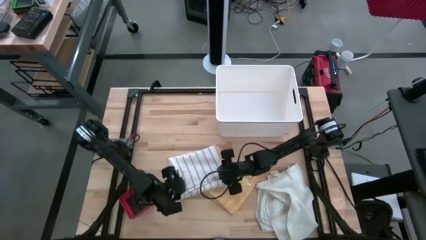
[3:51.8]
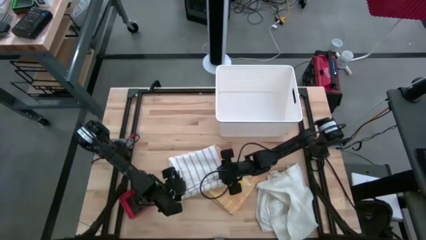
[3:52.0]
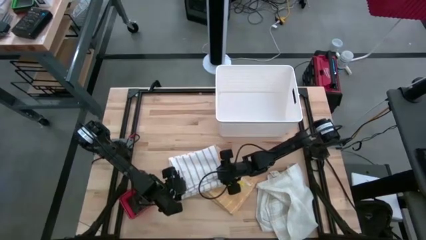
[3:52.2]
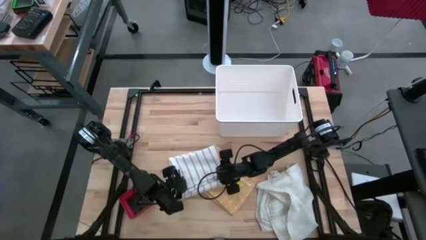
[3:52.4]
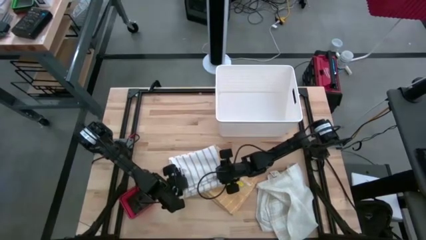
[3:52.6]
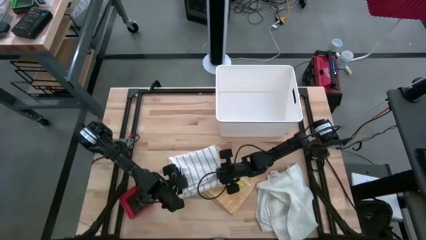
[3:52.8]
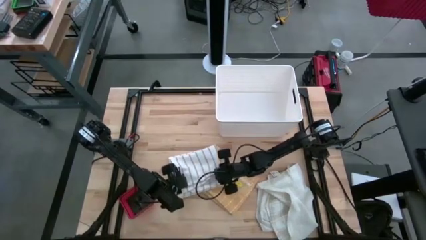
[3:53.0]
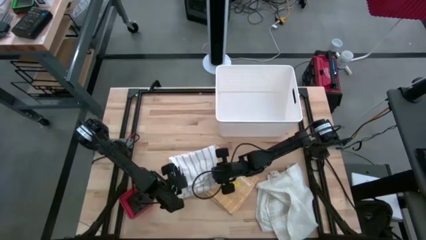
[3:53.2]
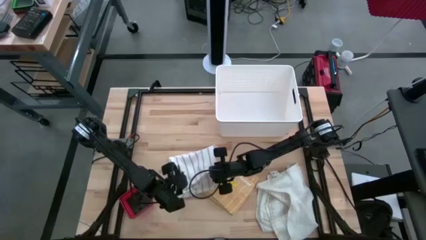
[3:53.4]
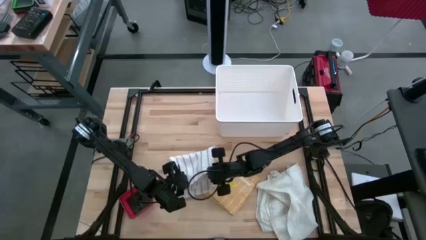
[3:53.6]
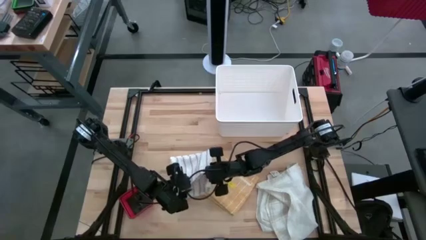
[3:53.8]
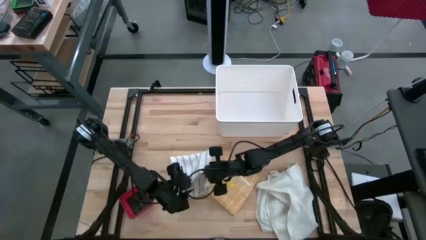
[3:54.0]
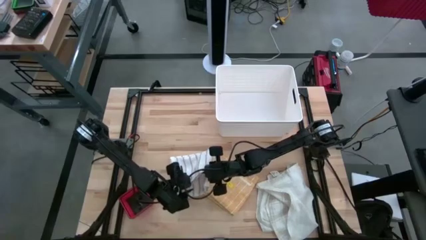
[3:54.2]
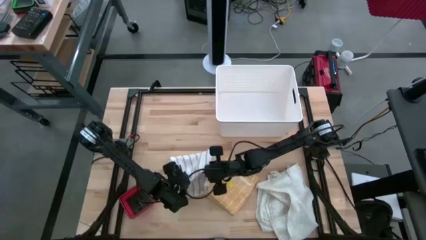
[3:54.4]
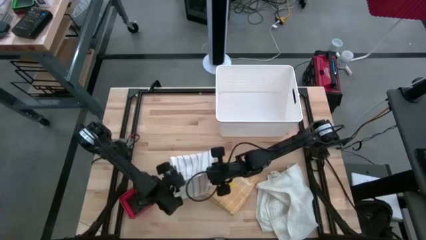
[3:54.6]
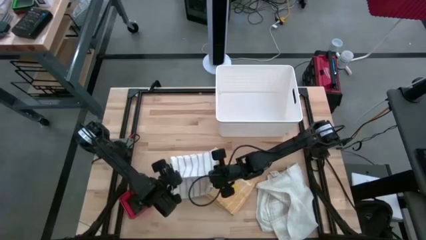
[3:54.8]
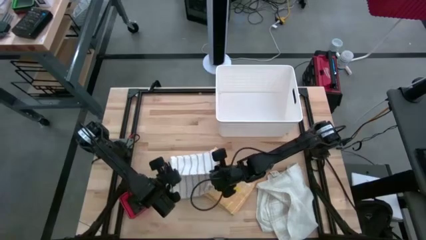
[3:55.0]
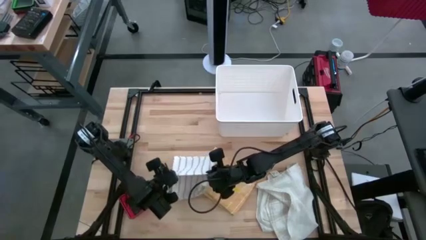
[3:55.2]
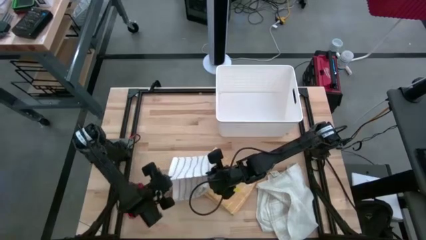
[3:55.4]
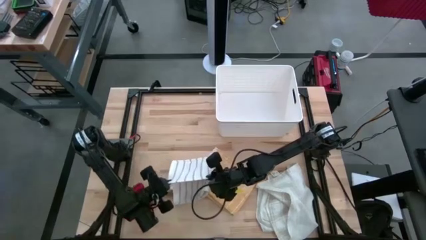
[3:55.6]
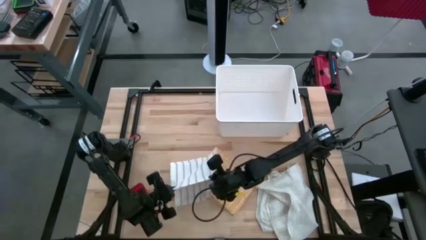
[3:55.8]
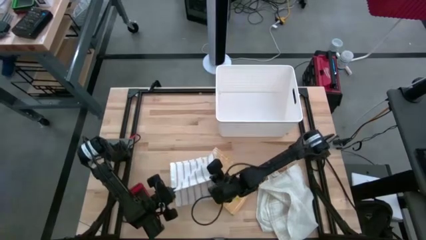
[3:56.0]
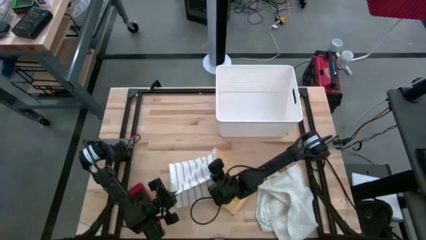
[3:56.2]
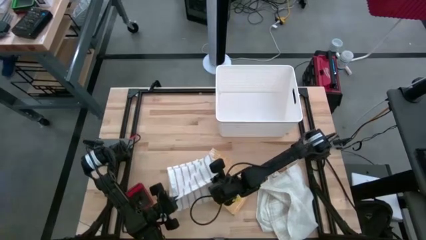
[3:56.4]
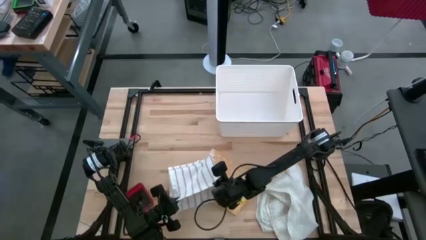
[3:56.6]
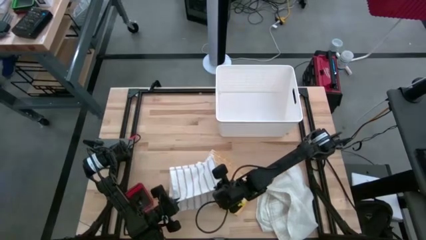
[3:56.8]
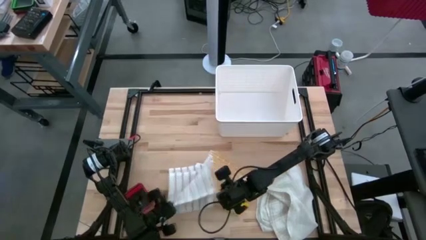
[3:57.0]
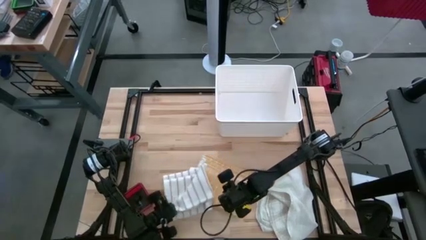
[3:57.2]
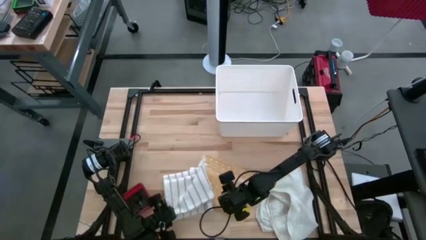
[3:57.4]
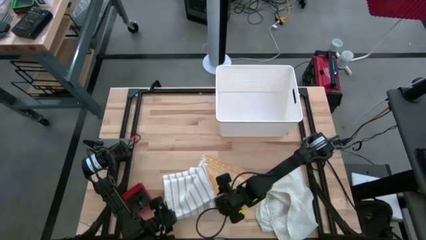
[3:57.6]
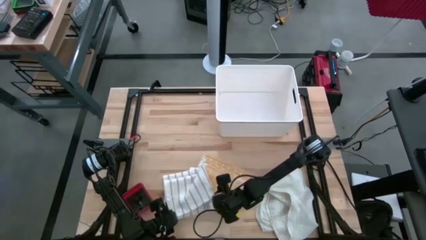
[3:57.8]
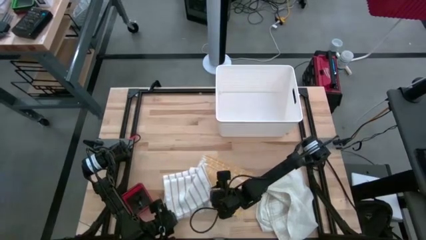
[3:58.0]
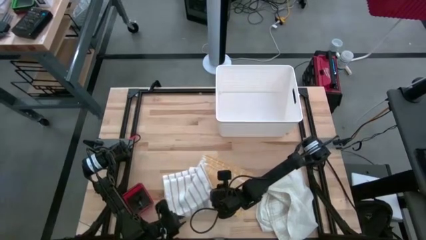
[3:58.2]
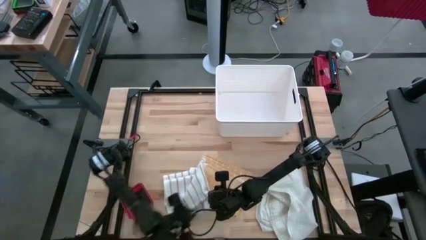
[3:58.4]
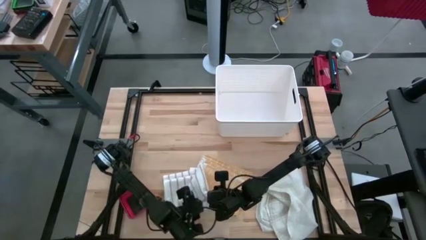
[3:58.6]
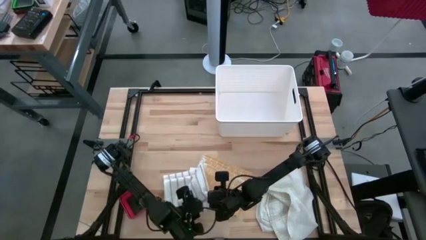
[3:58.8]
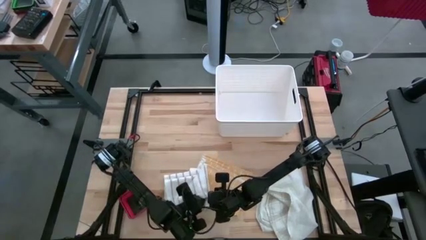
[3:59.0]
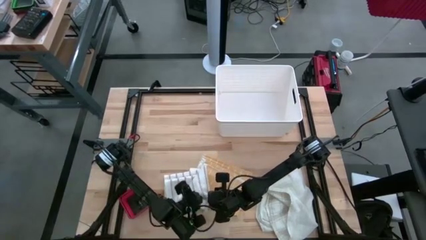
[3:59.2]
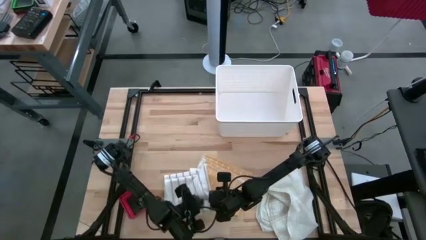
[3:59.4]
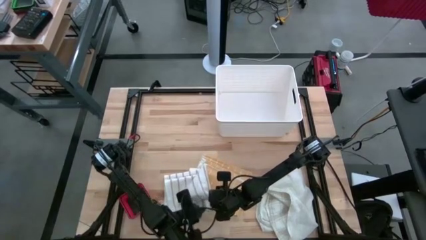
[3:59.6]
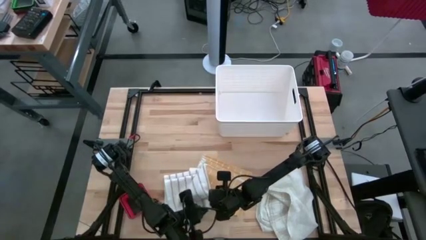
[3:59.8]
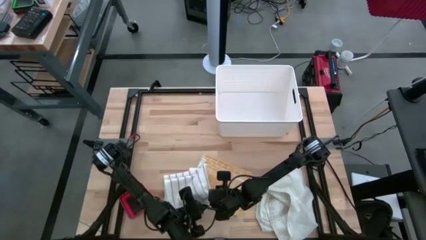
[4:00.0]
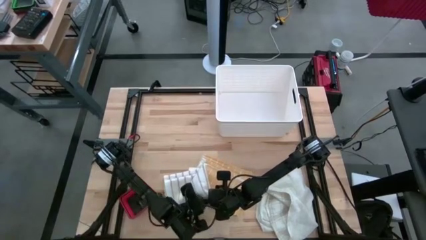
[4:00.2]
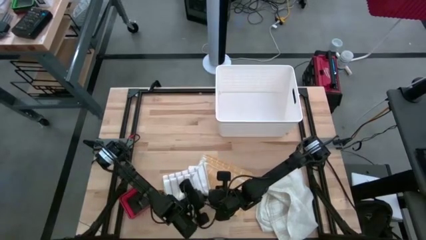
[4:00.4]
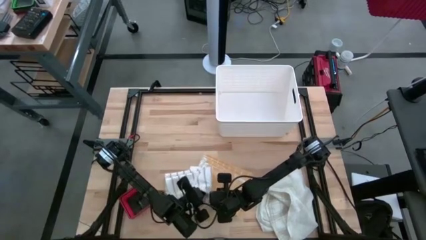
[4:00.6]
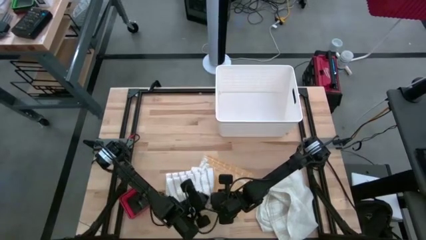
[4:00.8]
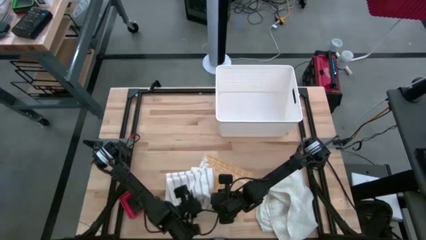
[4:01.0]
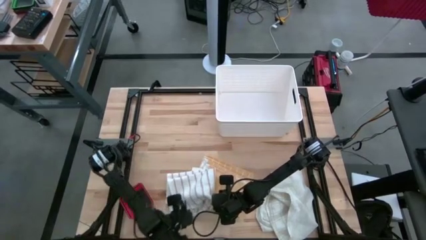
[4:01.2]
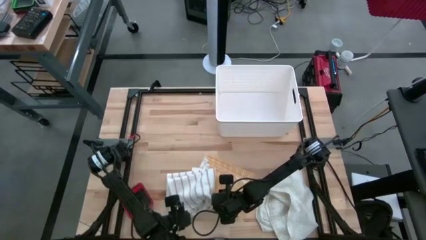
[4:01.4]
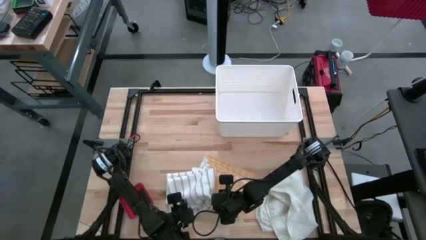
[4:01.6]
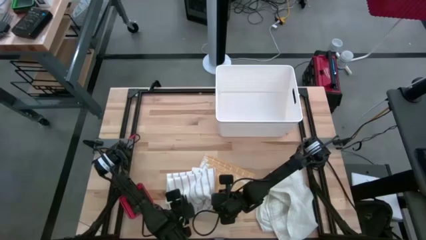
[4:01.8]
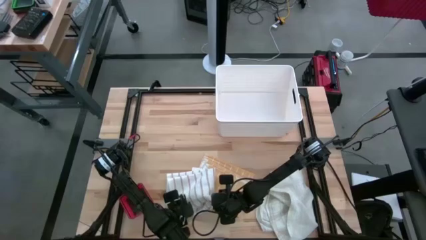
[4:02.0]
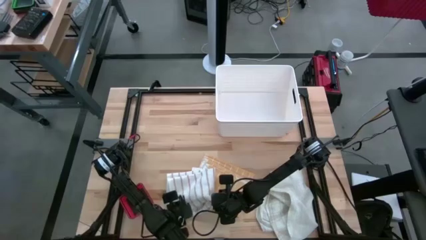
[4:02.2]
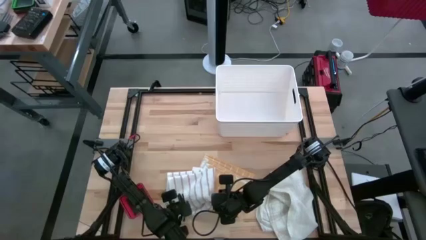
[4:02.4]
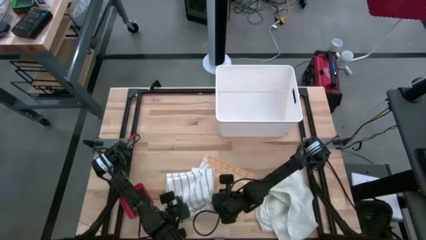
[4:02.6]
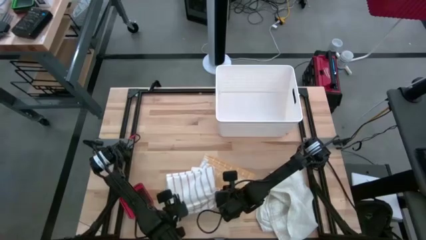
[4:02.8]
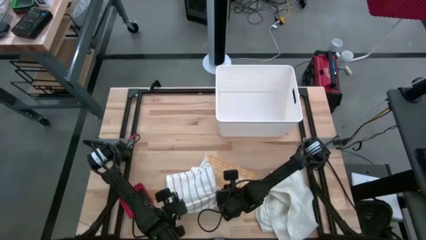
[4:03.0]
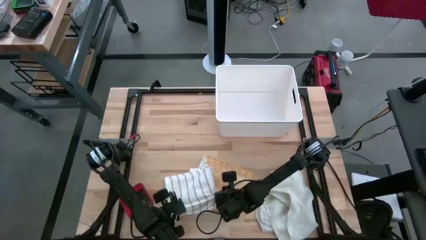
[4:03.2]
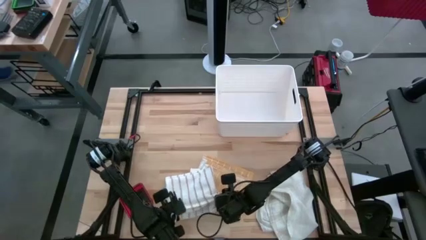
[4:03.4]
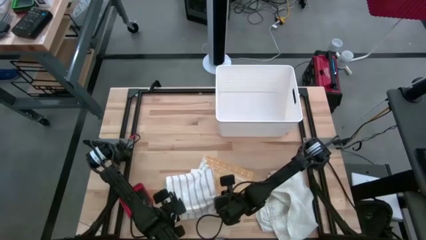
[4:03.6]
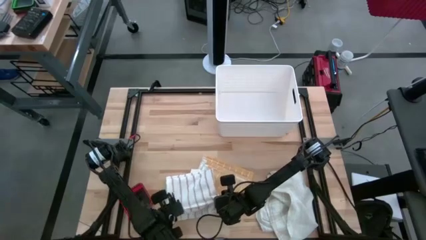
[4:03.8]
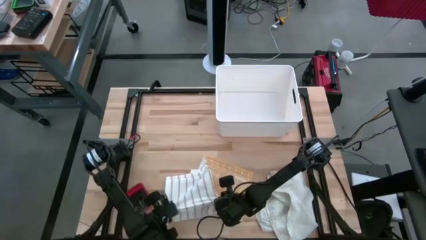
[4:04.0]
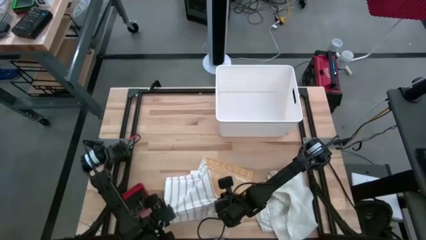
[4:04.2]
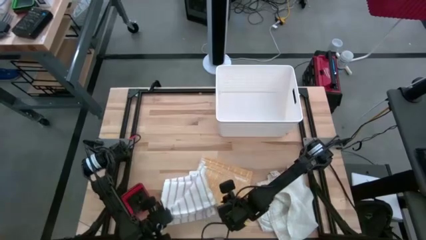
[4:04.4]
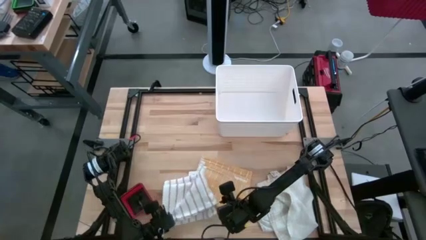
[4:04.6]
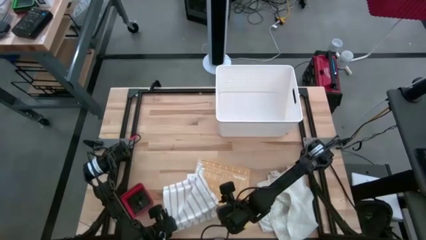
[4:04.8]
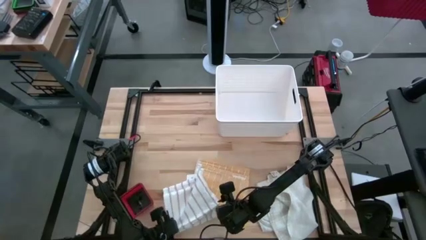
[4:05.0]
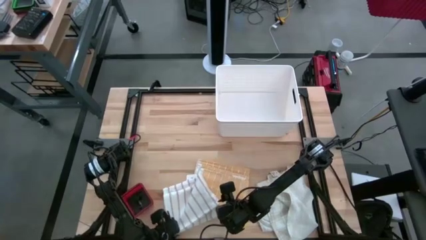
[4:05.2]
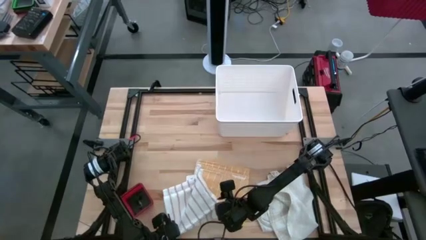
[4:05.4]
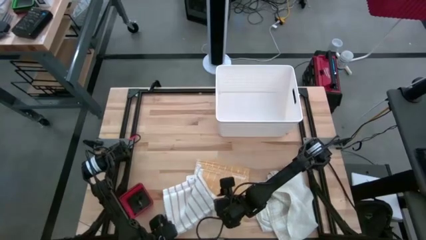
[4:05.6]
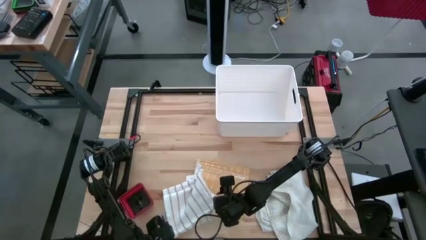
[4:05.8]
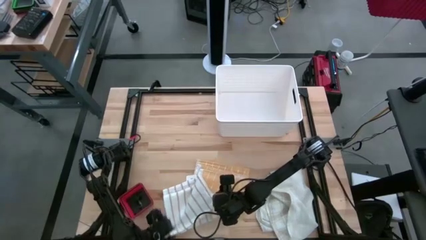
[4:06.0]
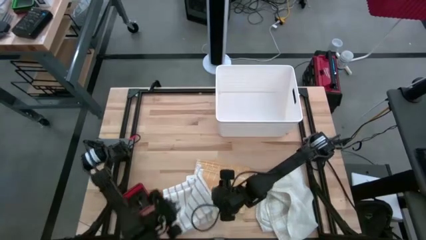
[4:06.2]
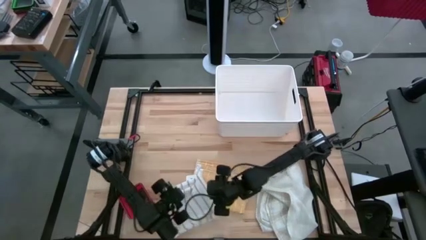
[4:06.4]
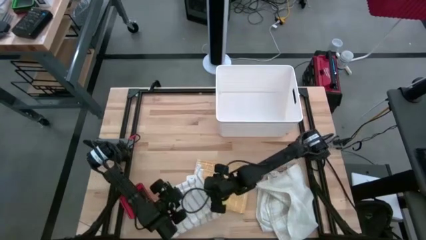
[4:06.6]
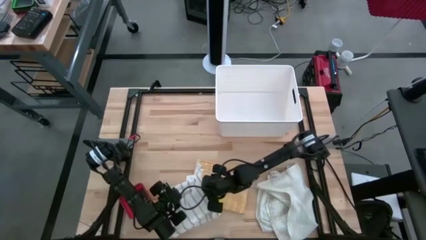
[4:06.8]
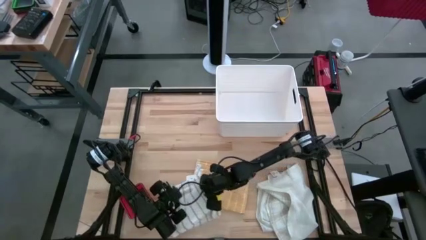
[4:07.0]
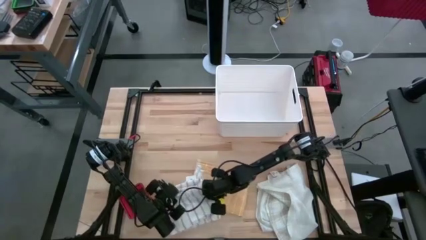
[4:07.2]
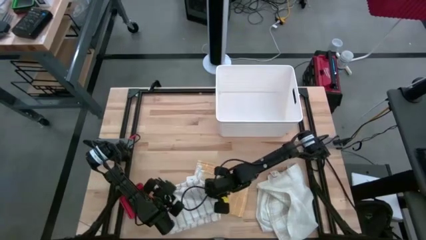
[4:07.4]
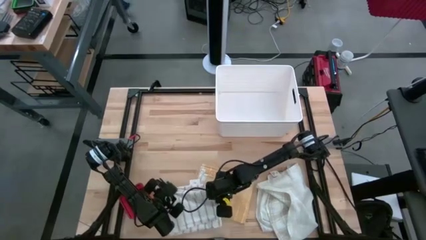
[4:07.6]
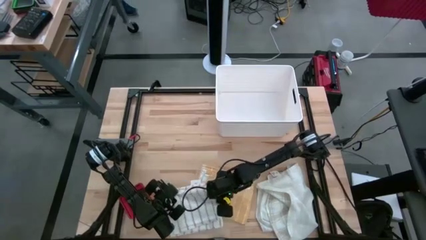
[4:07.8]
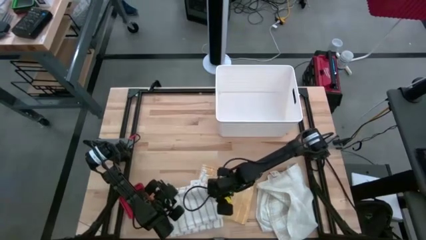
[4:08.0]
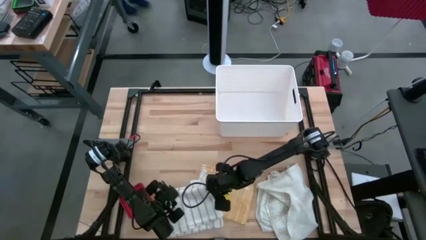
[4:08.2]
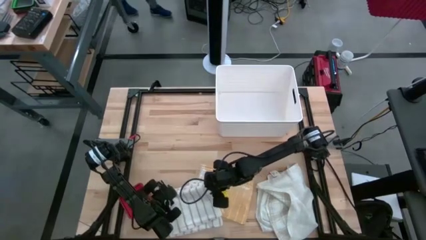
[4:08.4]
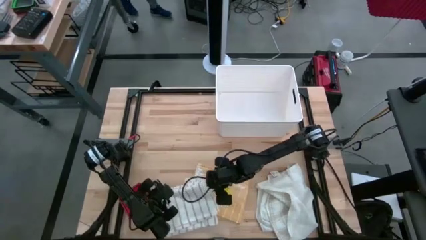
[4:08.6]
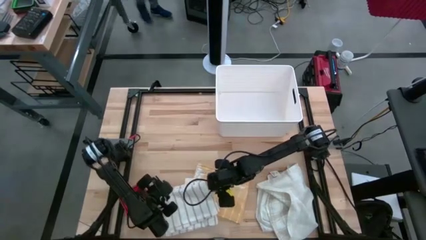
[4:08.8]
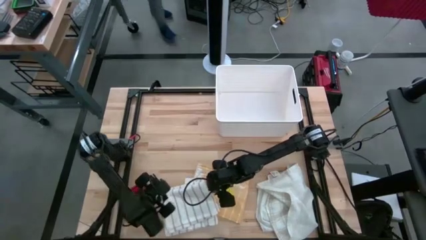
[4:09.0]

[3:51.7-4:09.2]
Task: Fold towel
Fold the brown patterned towel
